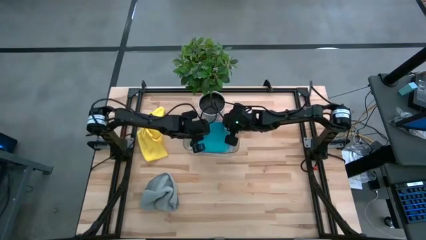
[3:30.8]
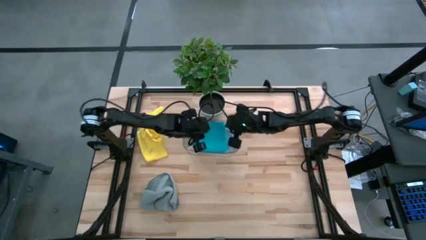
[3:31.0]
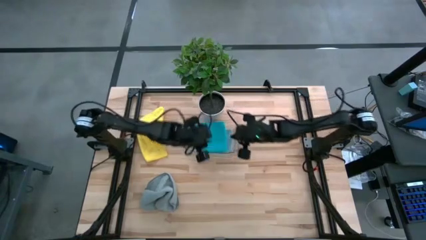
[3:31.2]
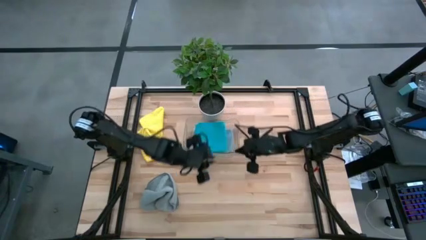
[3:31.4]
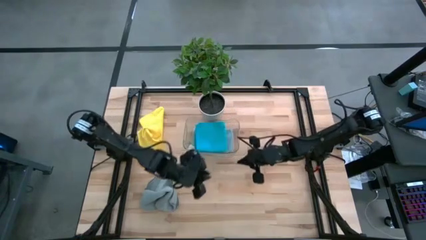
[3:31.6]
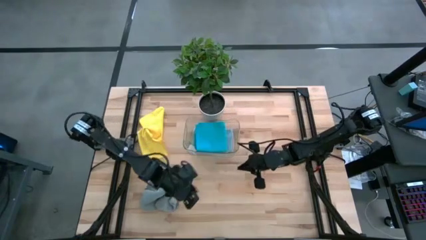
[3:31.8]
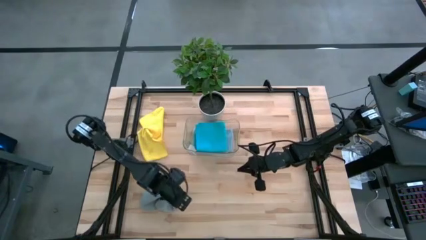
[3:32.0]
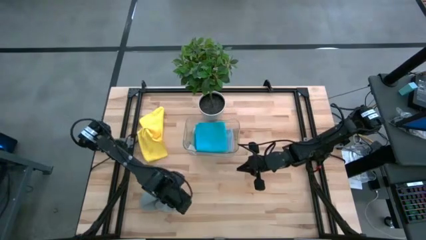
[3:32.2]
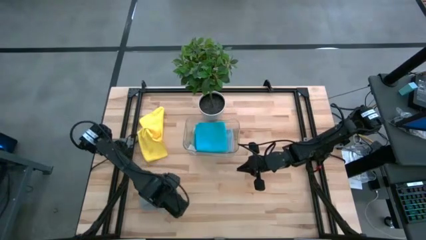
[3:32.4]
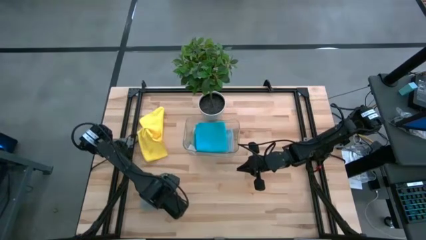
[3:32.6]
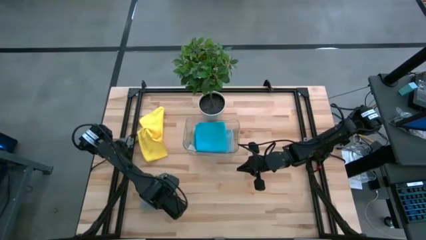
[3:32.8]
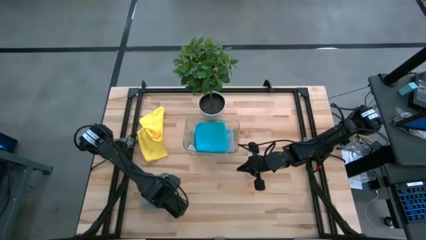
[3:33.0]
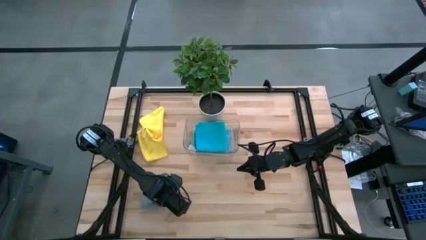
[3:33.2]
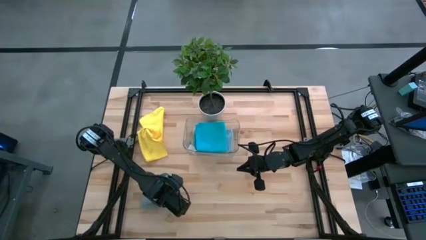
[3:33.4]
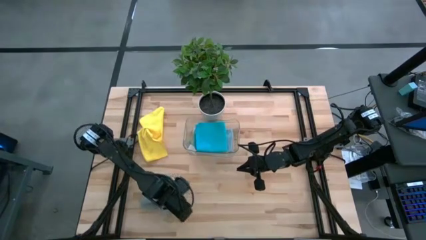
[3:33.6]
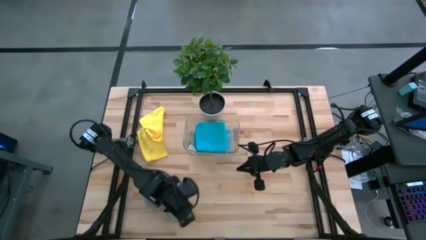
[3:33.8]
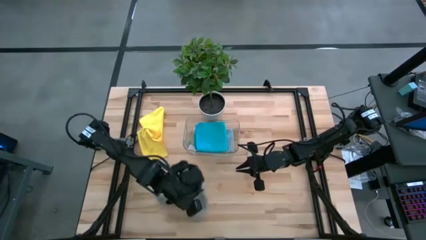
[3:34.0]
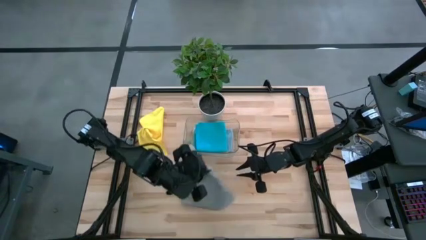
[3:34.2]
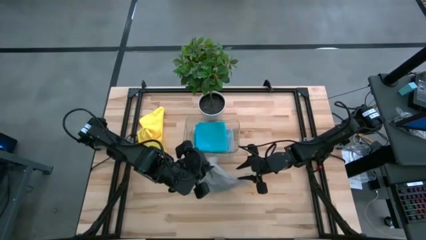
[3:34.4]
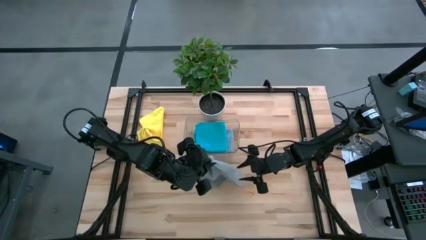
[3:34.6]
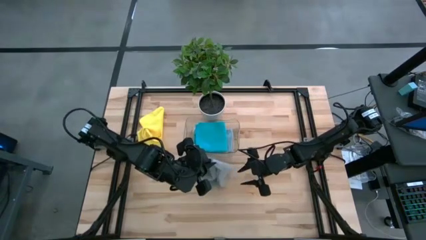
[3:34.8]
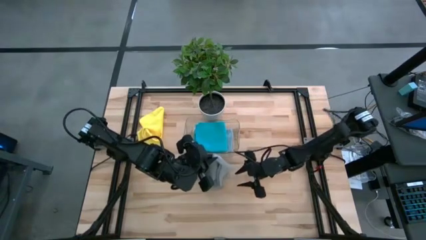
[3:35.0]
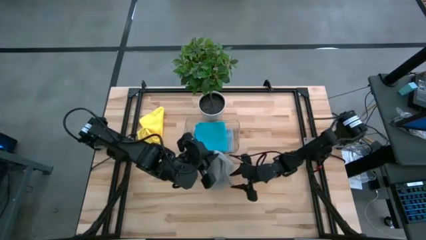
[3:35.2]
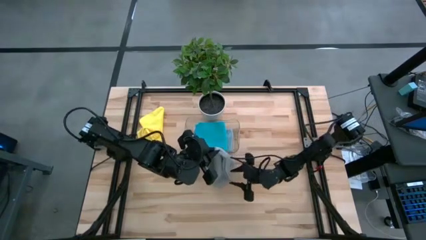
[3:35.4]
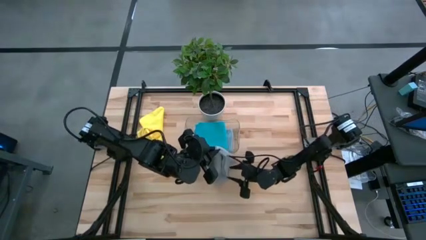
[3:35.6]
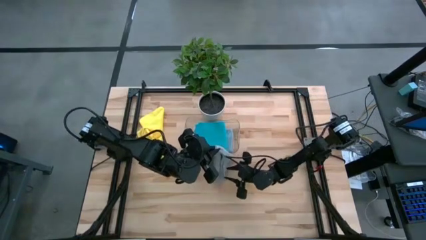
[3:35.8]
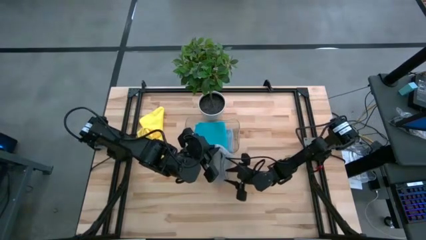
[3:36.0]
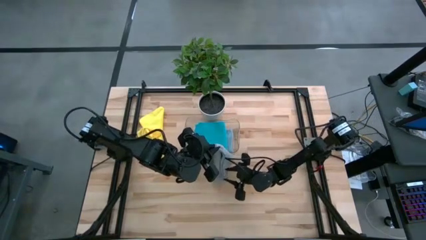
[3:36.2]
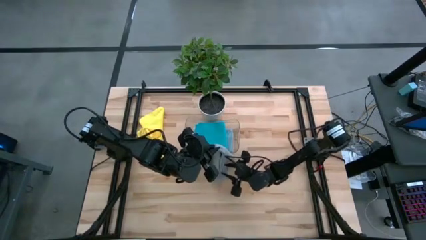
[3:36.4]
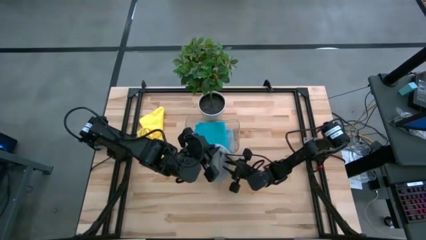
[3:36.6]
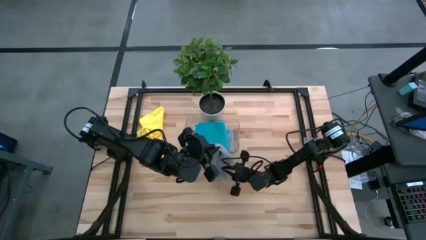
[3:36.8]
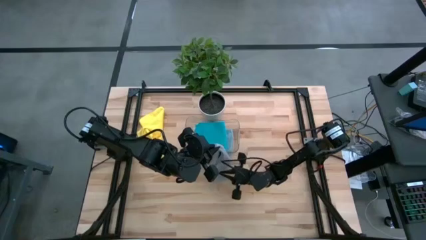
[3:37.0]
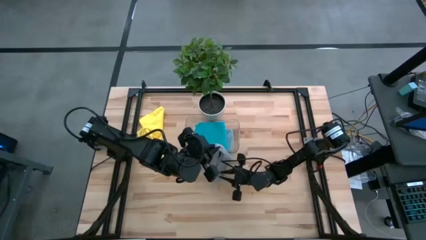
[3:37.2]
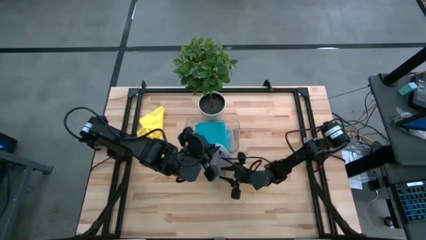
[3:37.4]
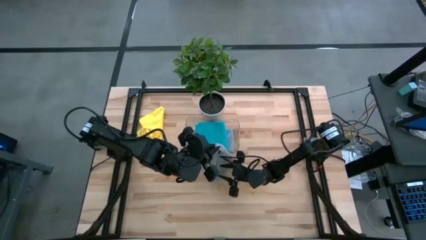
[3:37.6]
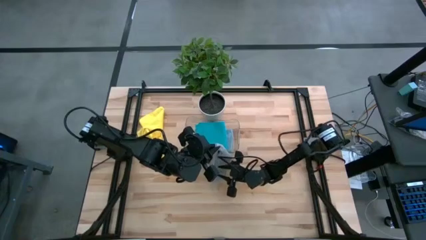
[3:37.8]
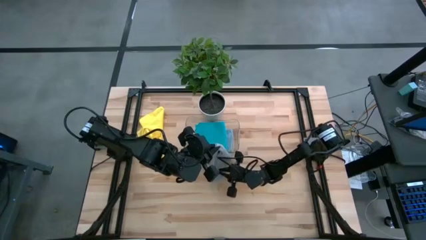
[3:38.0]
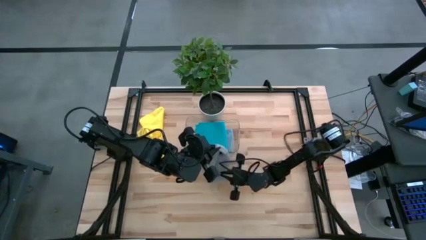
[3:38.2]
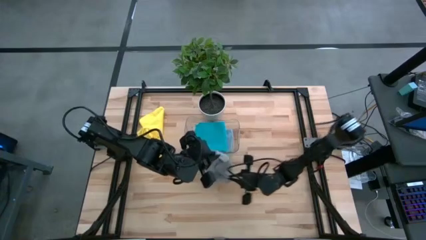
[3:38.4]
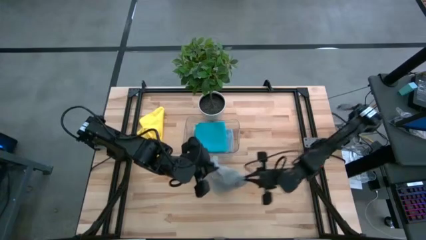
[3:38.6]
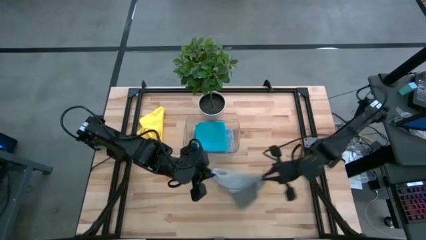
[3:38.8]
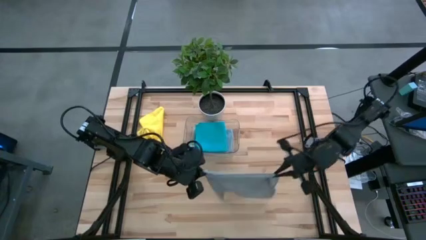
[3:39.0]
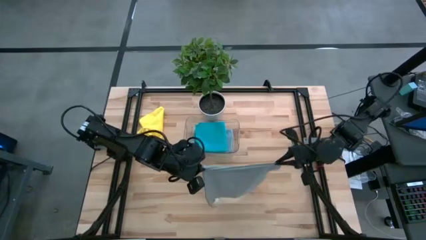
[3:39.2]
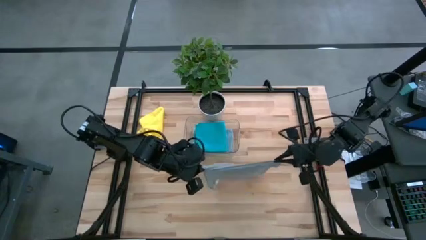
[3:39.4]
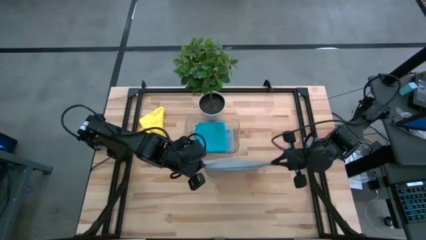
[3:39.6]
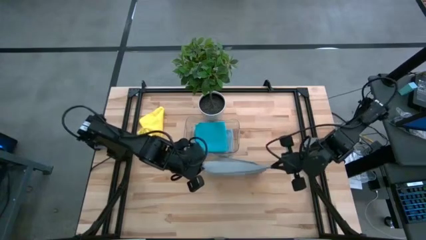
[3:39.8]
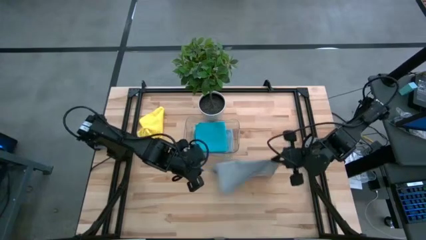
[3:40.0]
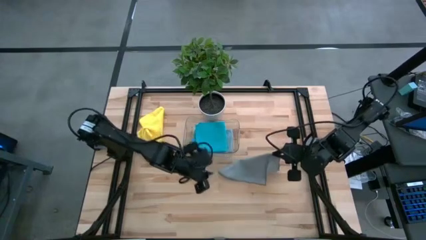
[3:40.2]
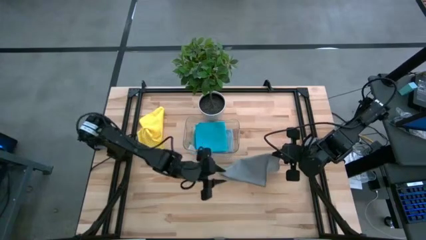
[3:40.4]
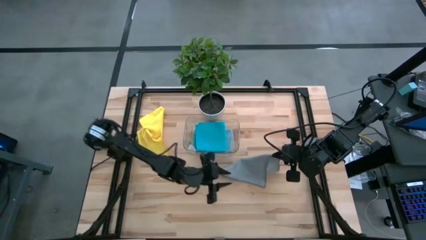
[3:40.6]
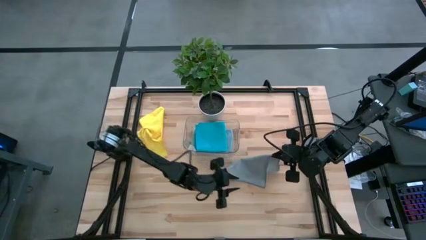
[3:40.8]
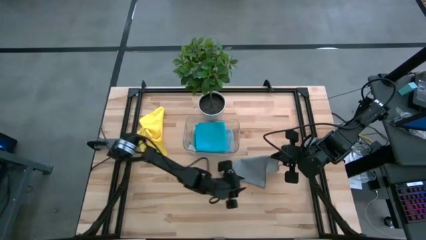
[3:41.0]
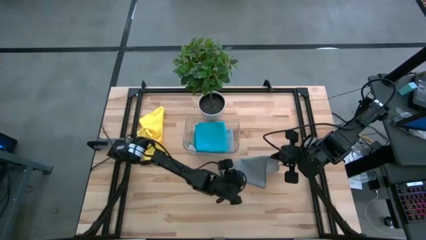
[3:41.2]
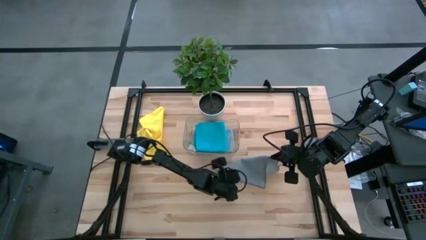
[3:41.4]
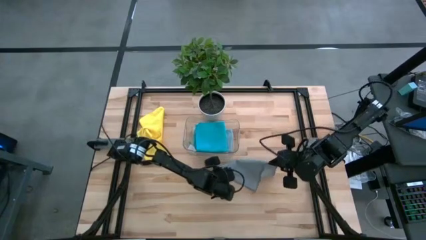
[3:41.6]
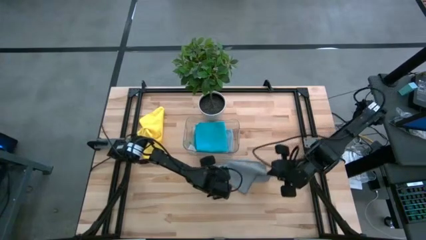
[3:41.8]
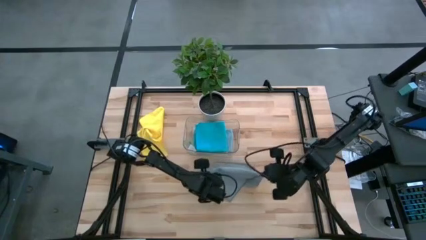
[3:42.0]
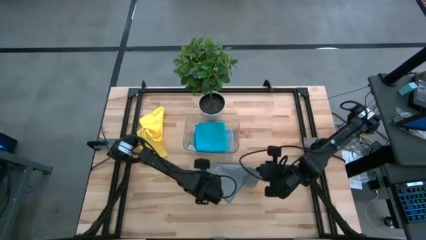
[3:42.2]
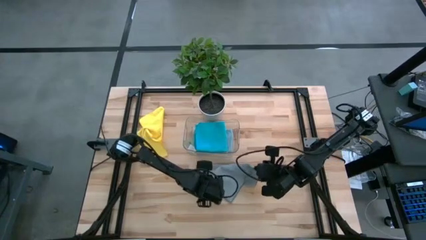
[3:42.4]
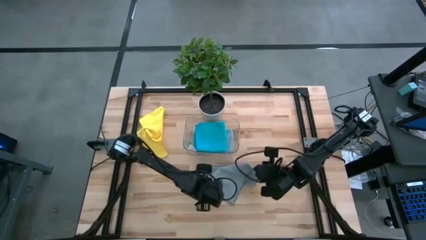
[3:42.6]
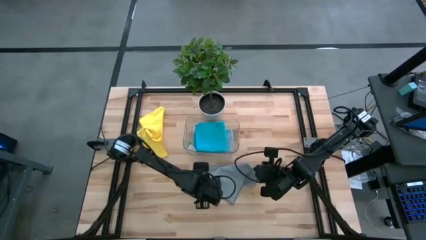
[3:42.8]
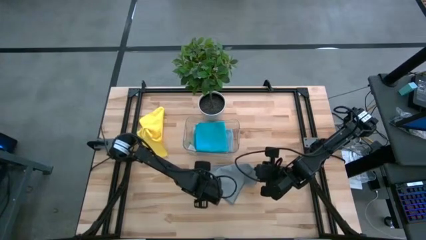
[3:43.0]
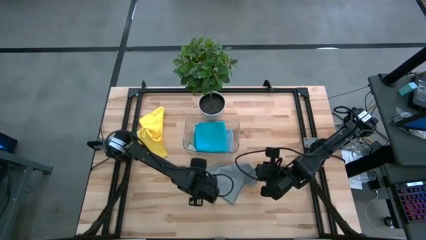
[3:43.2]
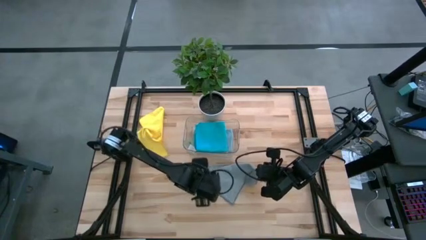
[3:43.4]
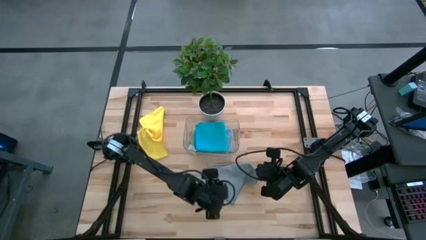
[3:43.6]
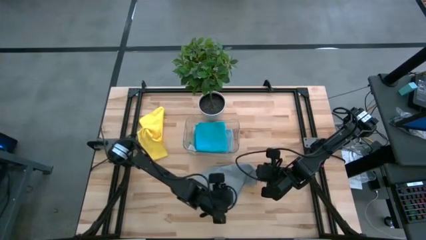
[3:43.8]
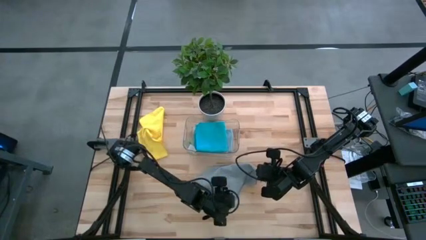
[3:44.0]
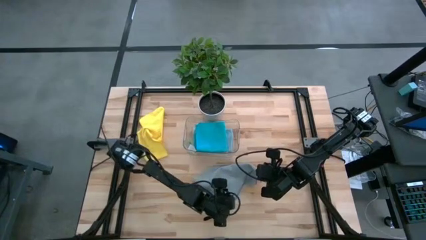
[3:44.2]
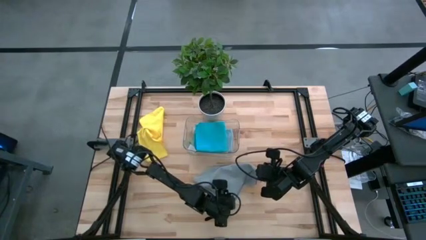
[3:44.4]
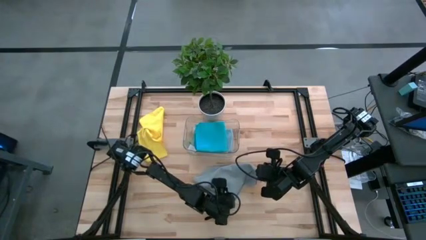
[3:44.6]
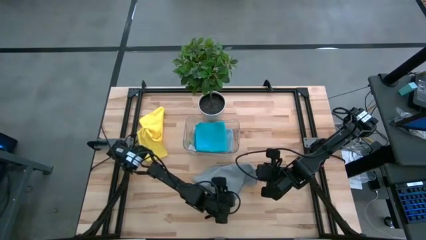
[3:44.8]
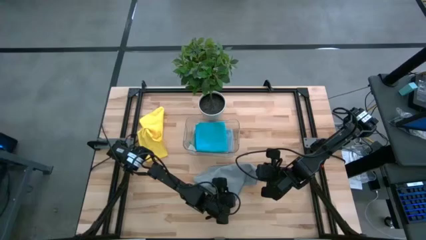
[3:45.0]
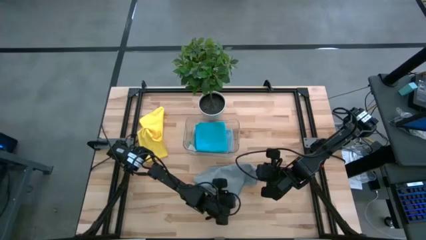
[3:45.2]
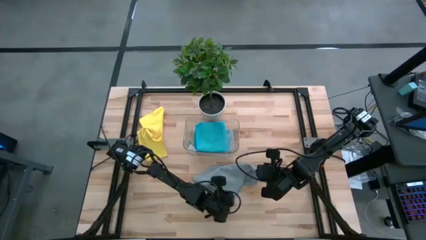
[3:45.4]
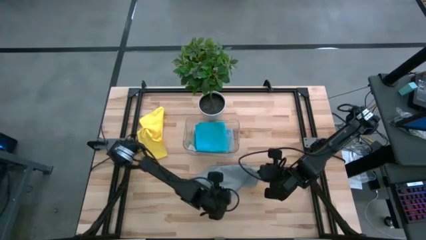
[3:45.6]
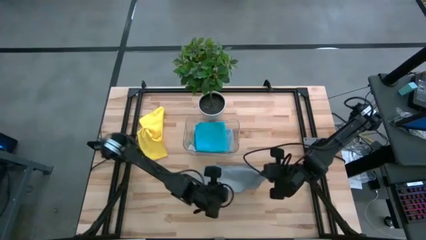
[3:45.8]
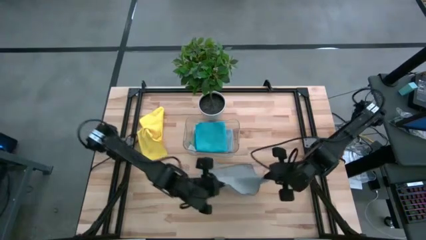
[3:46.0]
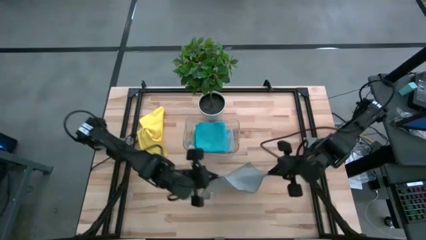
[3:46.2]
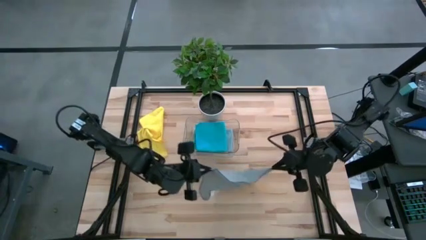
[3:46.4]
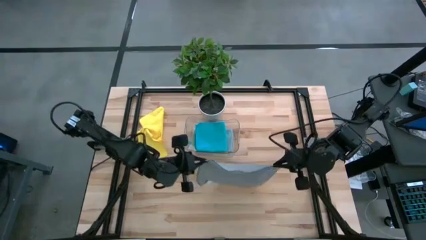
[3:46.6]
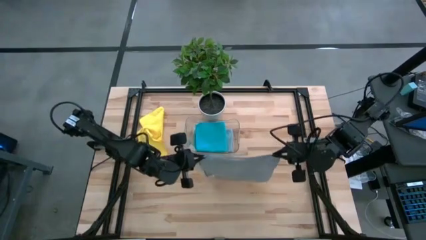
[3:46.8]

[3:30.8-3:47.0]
Task: Fold microfiber towels
Fold the gray microfiber cloth
